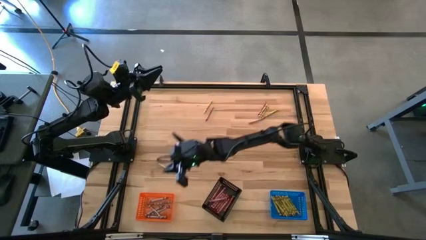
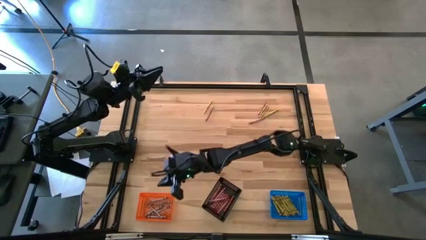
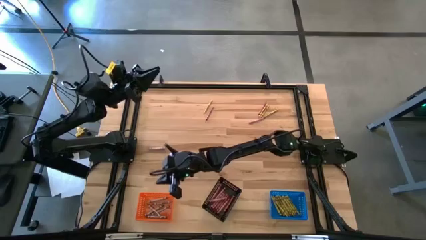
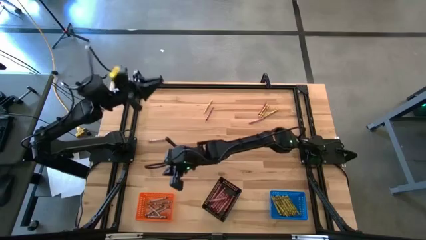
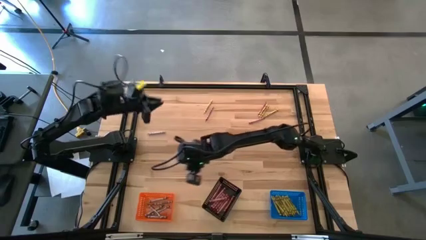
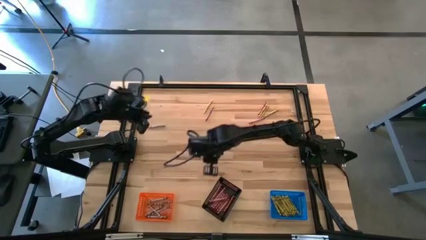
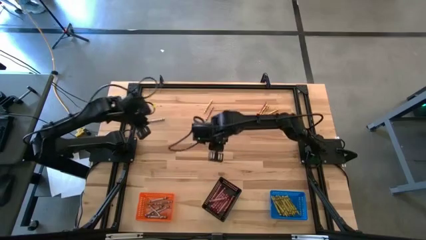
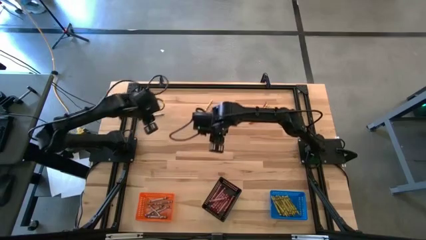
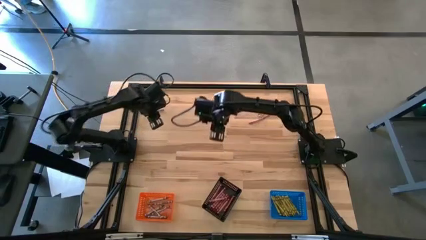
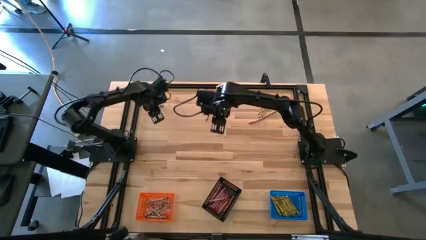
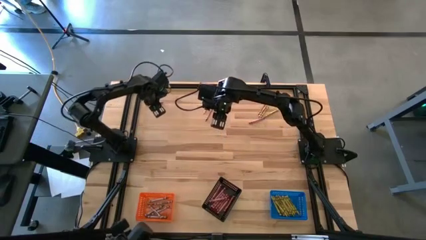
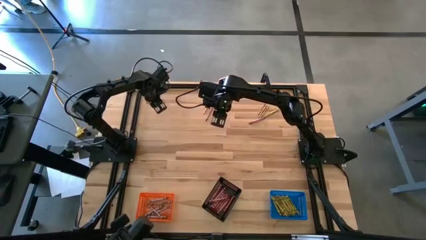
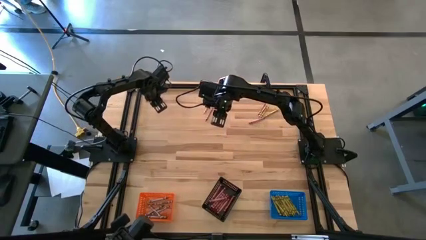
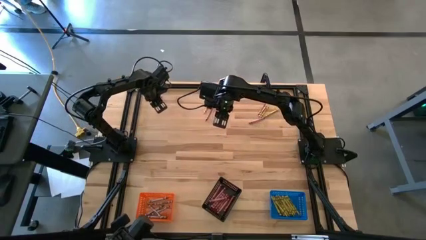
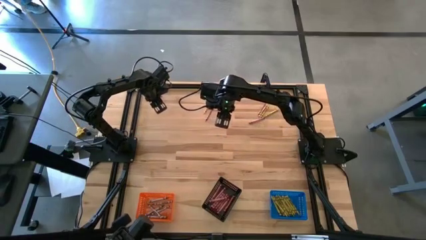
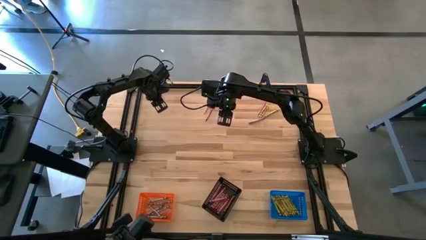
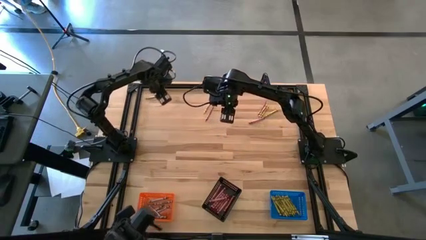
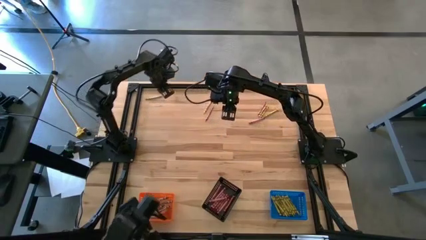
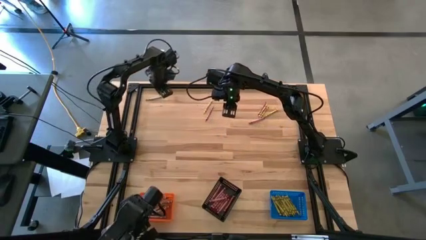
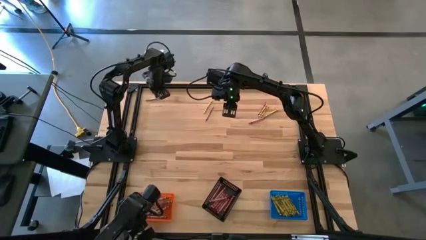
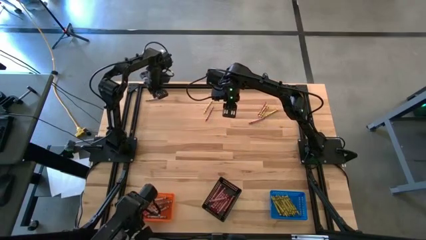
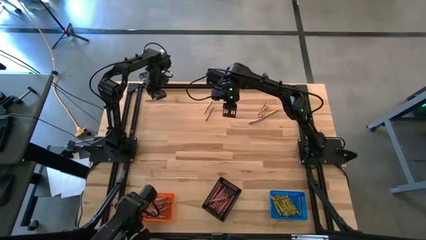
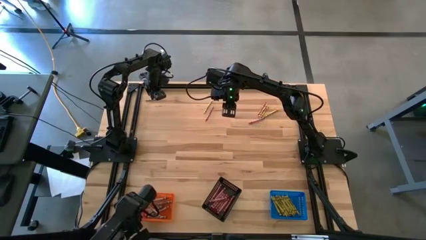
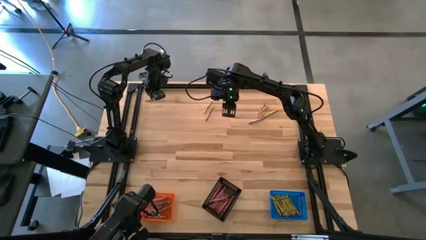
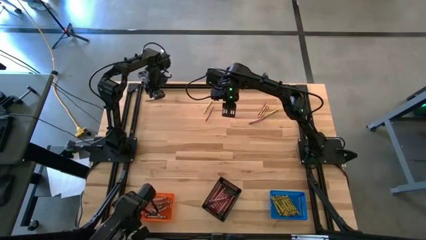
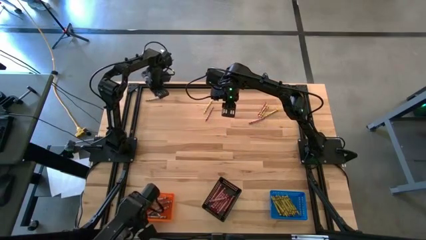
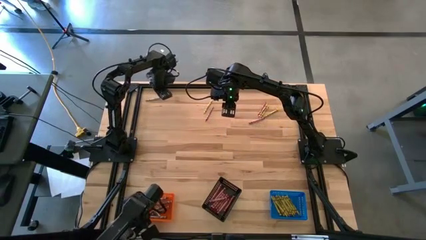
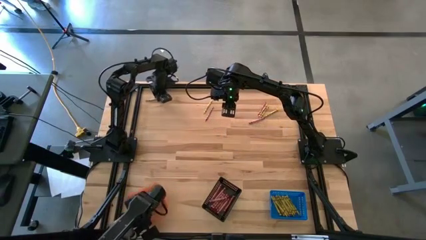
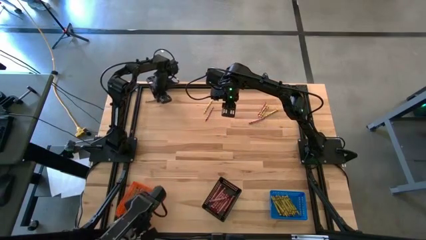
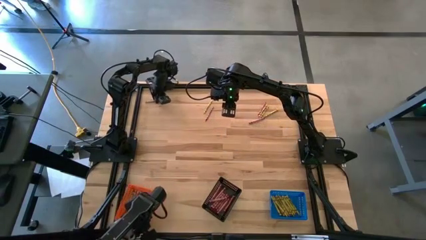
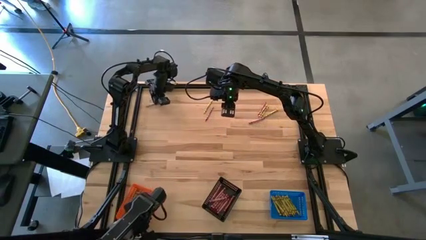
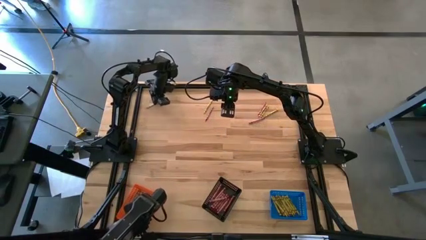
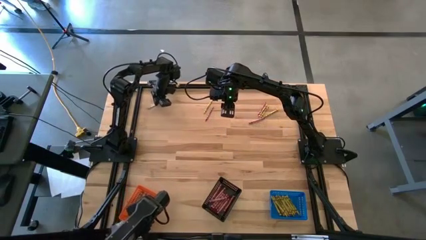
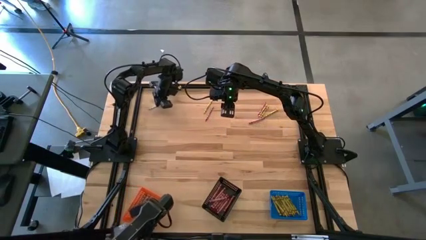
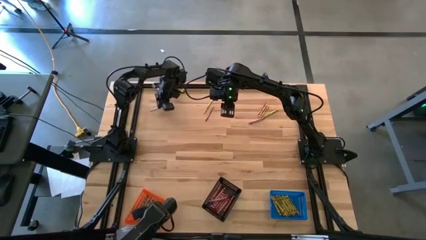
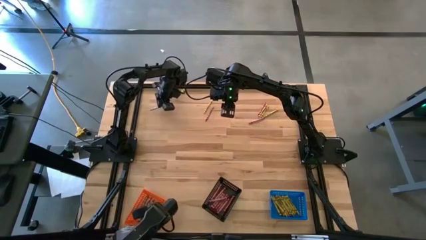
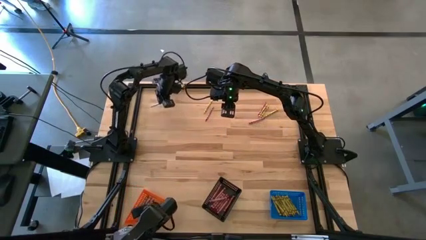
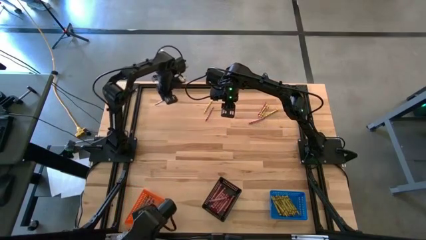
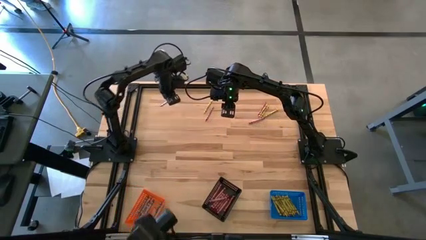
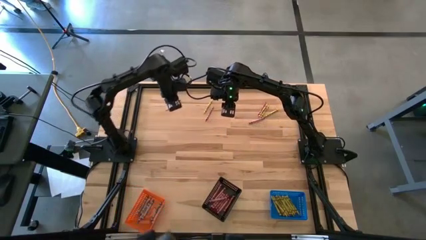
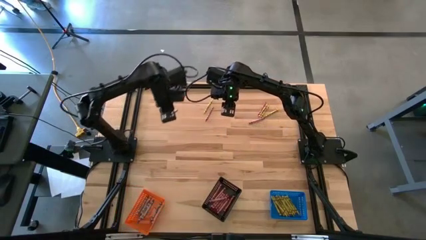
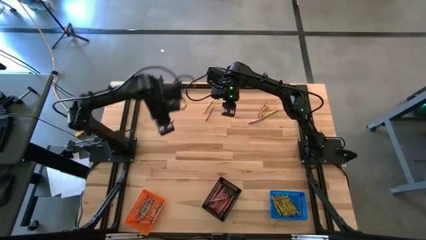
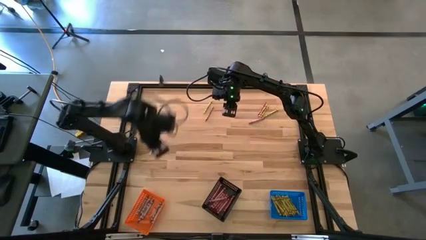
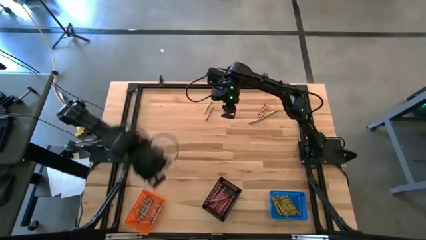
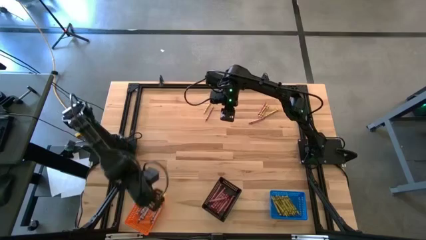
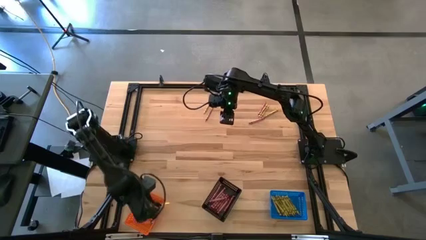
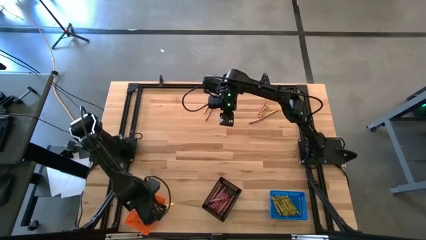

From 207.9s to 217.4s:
Task: Sort crayons
Put the gray crayon into the orange bin

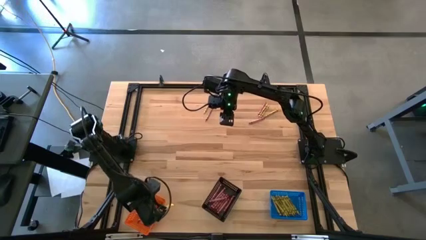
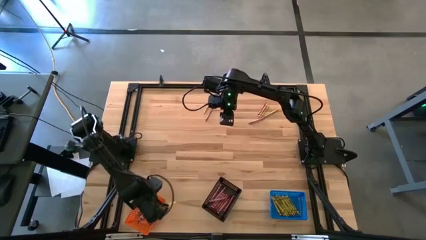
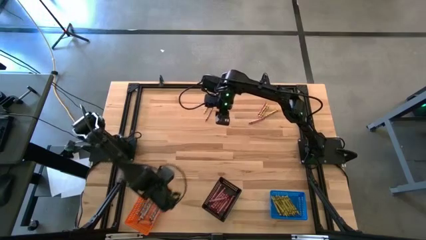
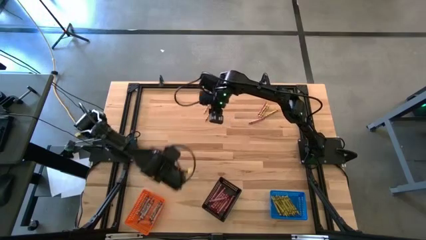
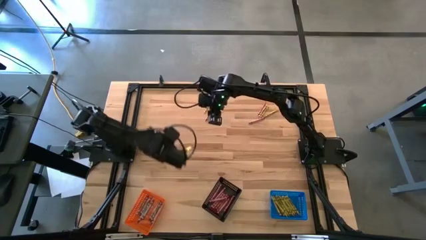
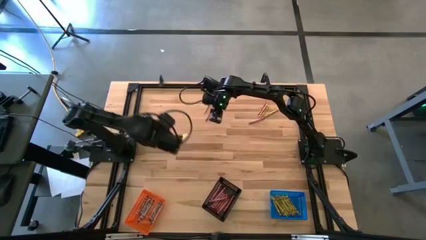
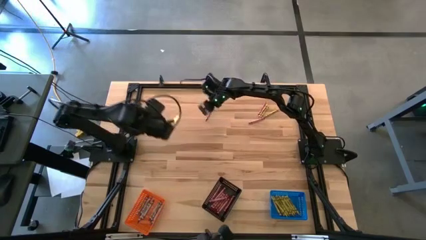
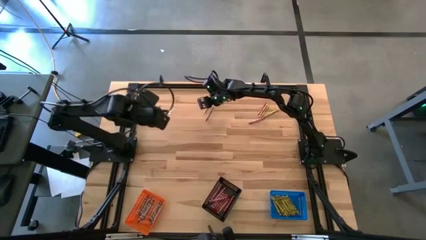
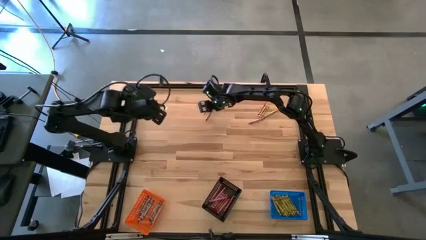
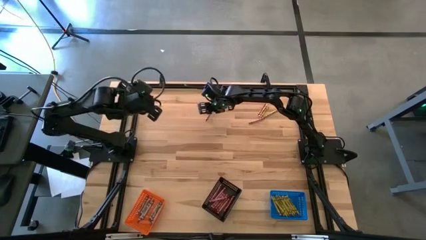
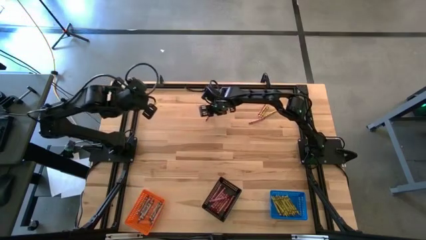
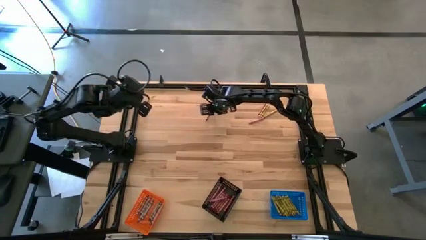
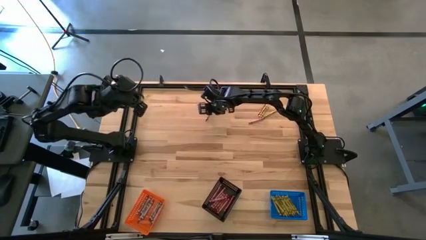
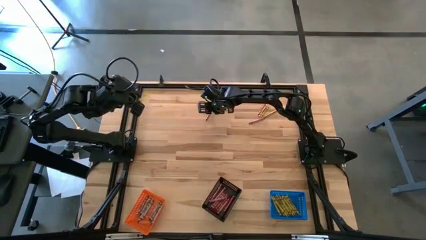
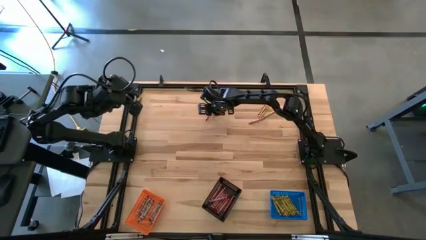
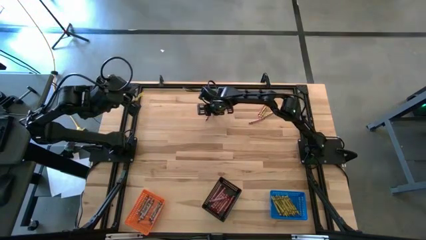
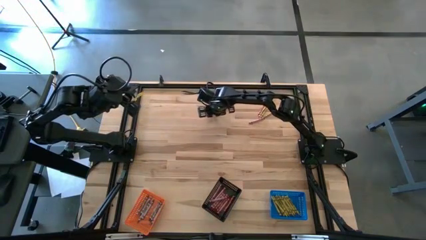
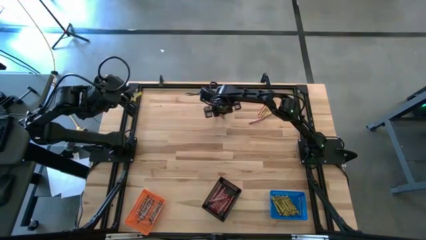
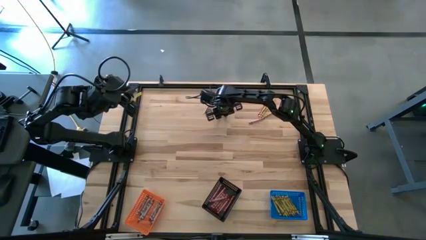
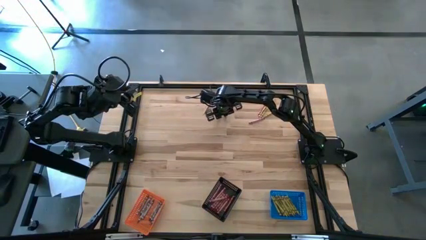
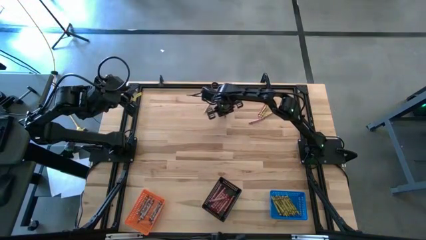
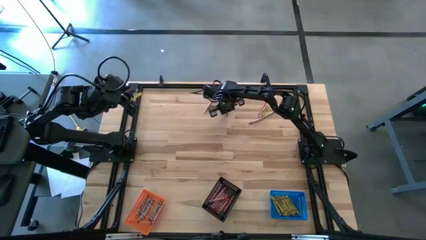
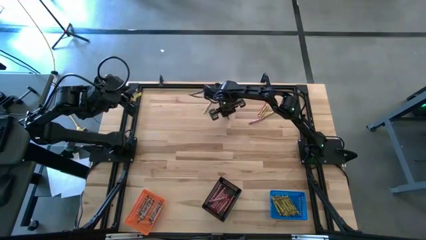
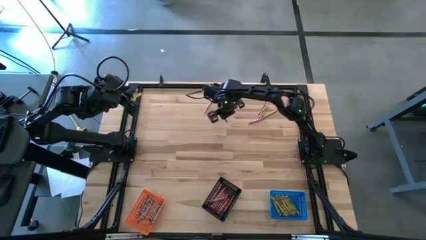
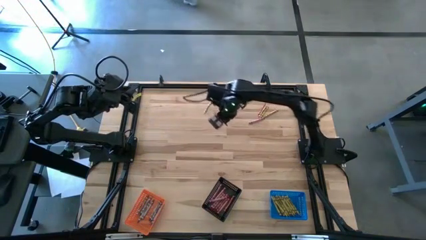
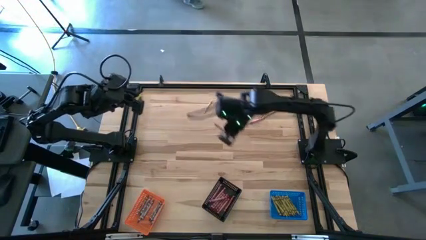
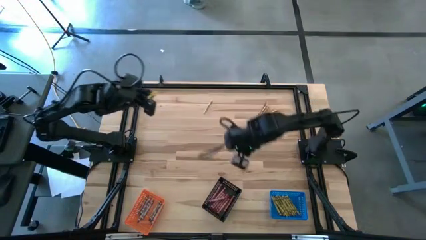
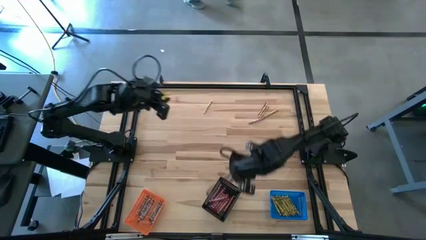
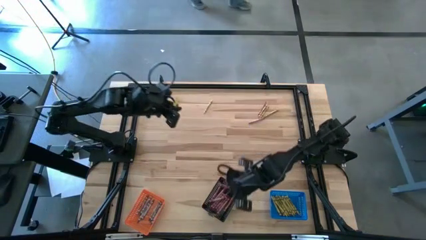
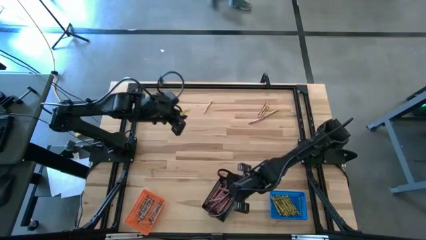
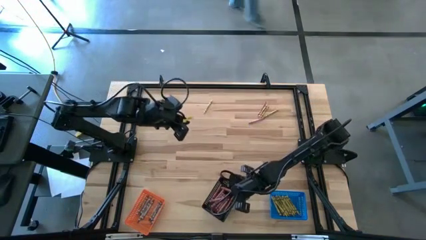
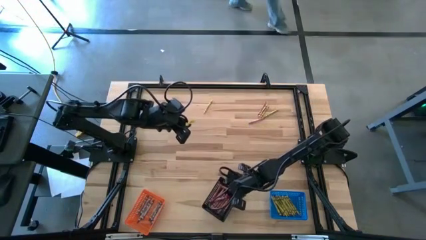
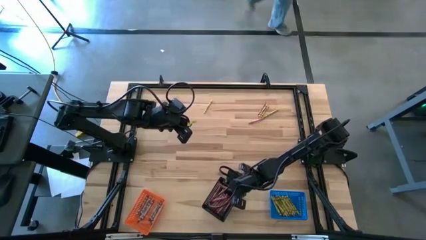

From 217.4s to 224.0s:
Put the red crayon into the black bin
